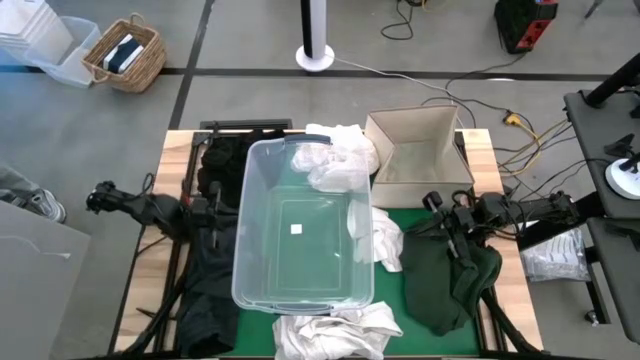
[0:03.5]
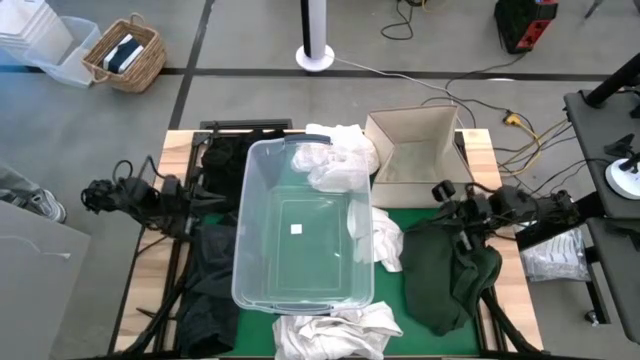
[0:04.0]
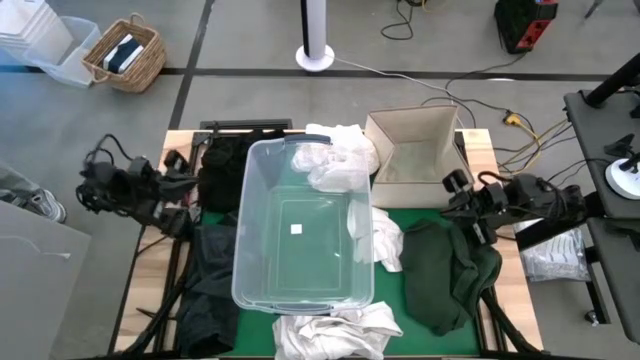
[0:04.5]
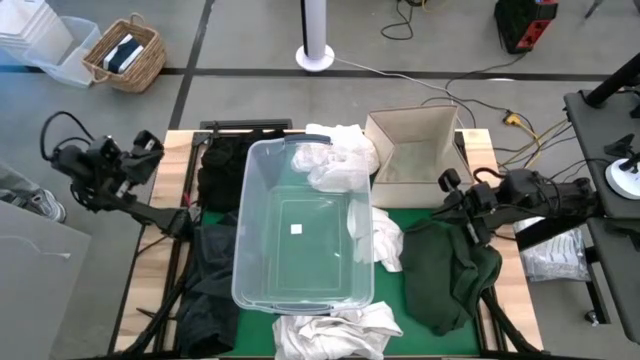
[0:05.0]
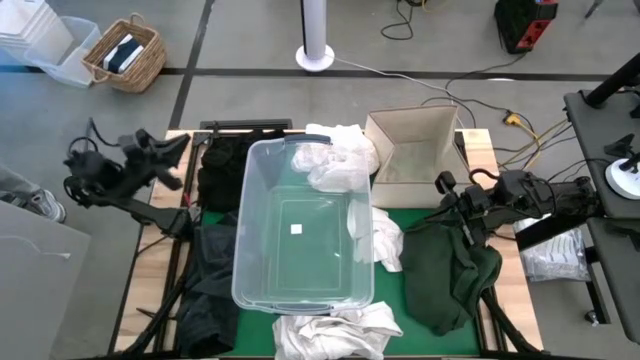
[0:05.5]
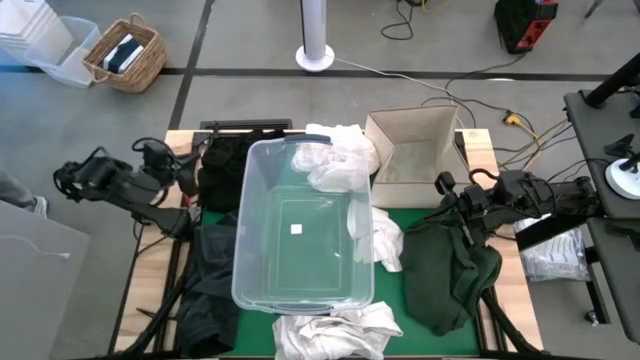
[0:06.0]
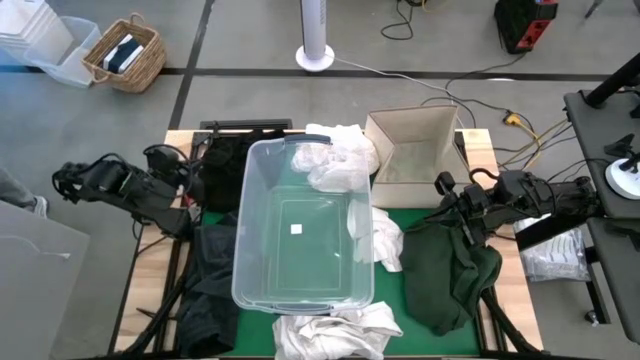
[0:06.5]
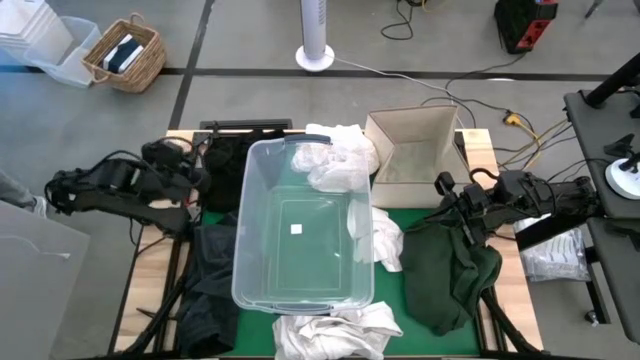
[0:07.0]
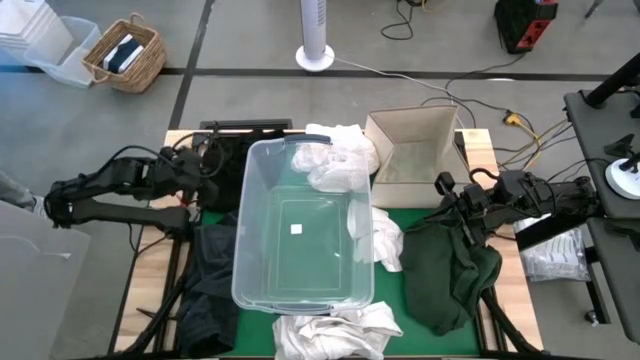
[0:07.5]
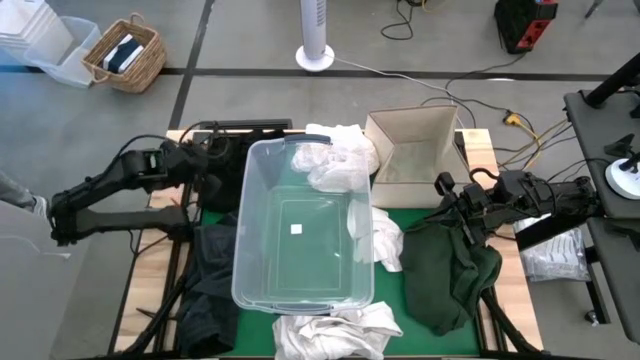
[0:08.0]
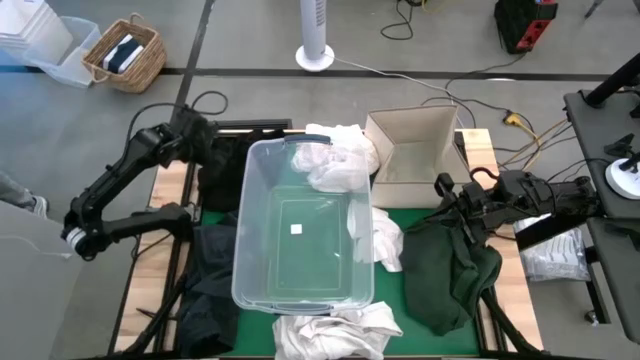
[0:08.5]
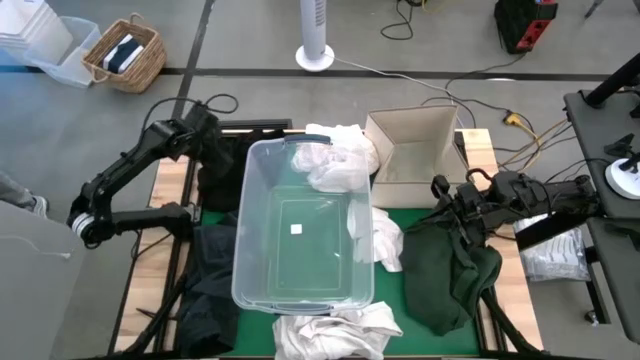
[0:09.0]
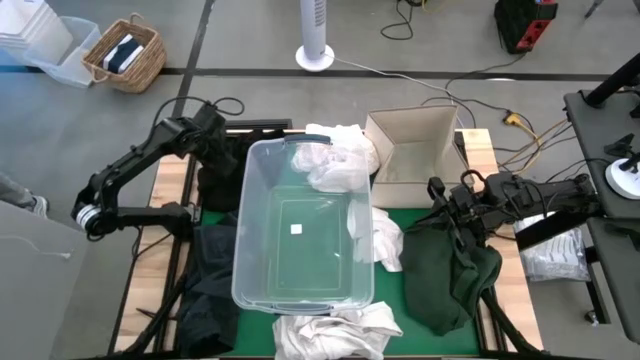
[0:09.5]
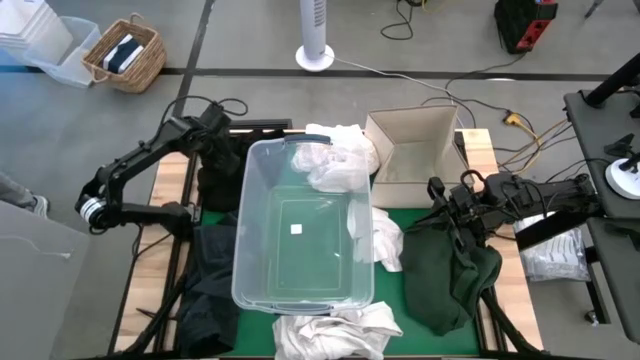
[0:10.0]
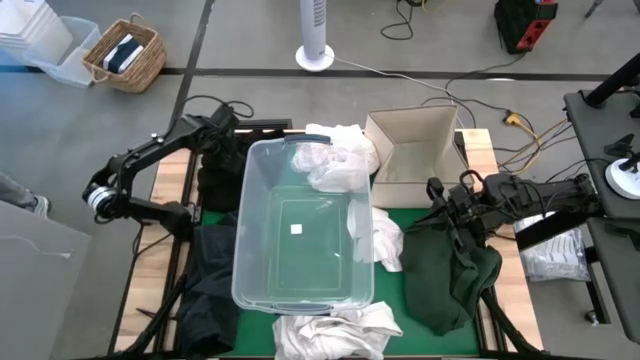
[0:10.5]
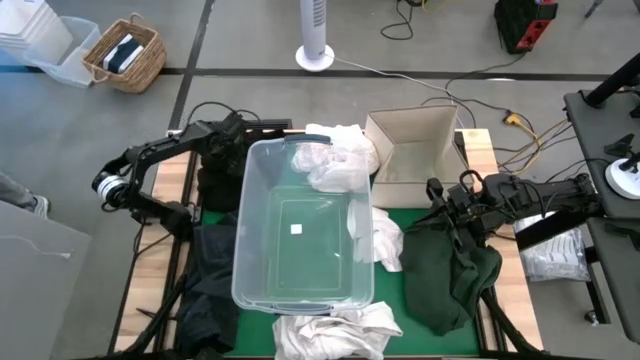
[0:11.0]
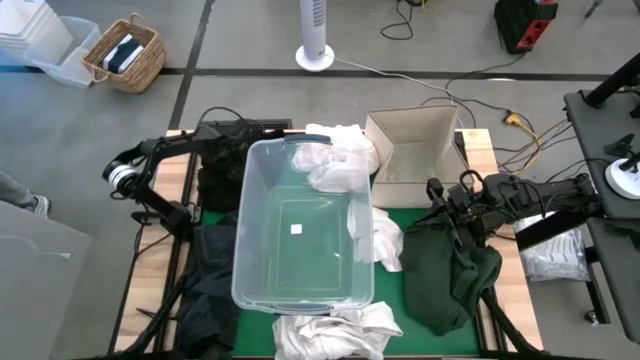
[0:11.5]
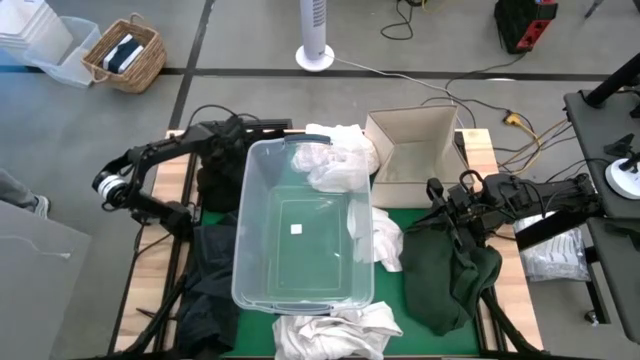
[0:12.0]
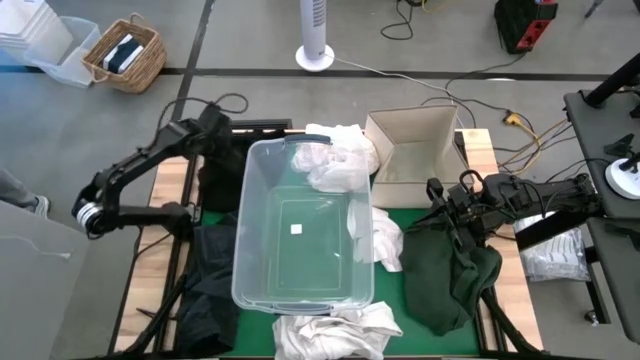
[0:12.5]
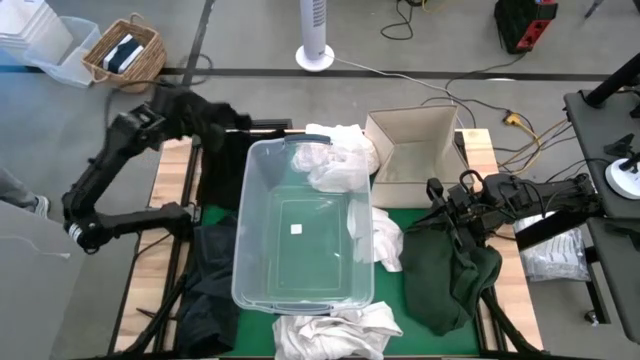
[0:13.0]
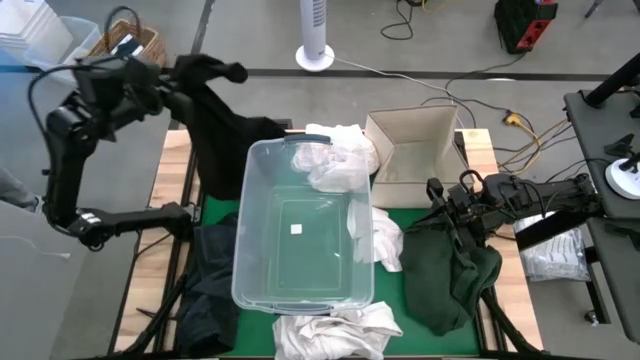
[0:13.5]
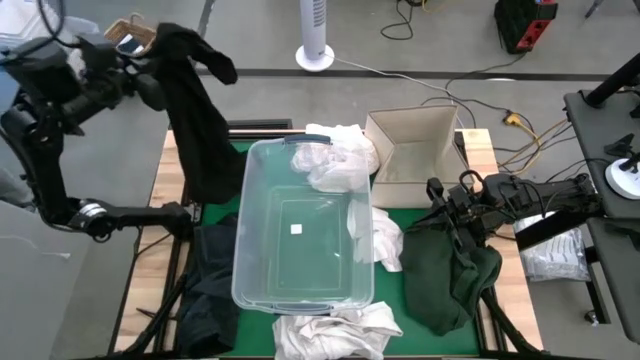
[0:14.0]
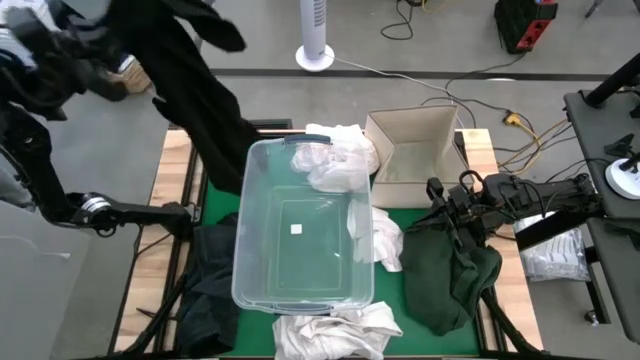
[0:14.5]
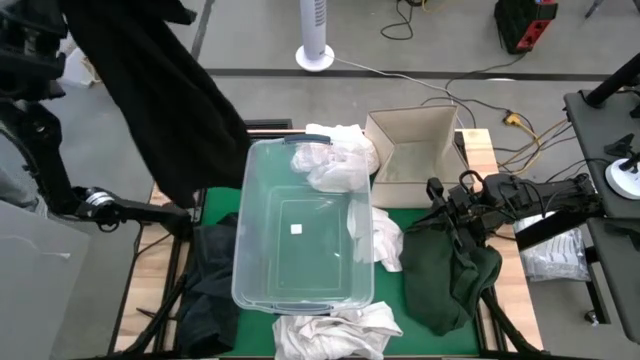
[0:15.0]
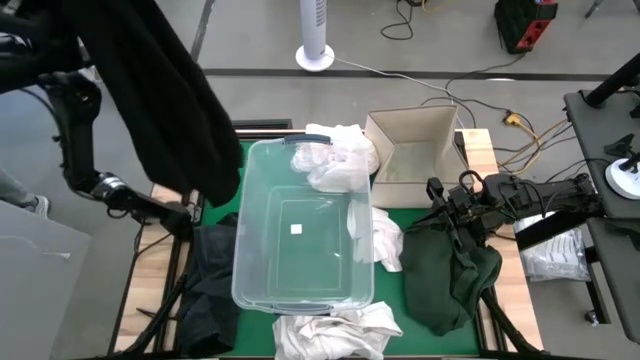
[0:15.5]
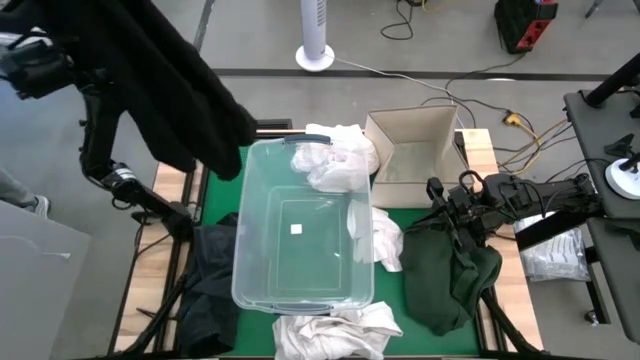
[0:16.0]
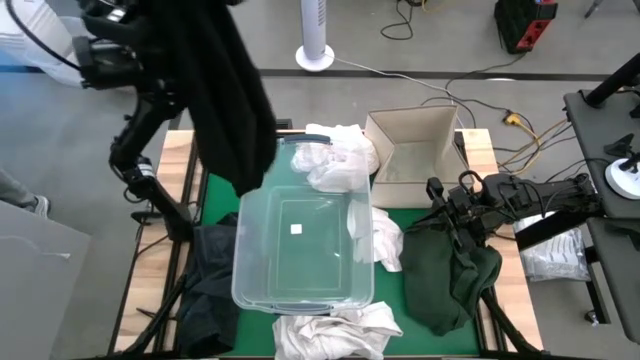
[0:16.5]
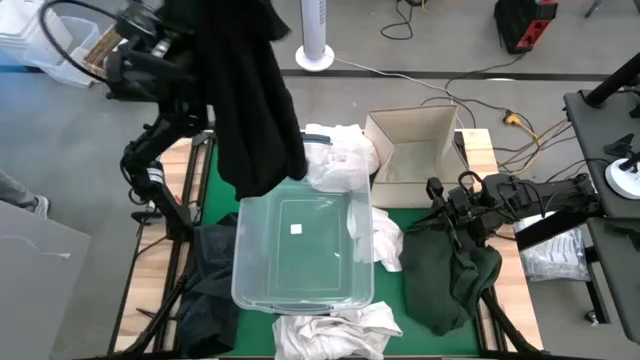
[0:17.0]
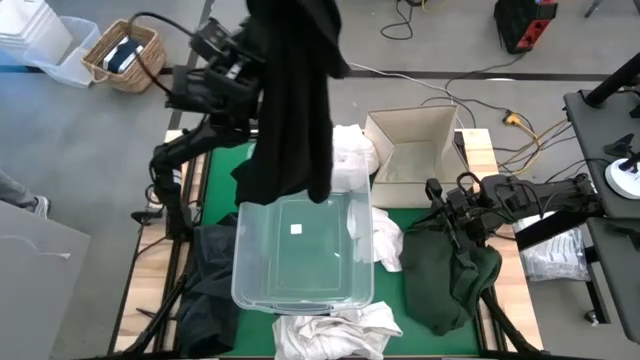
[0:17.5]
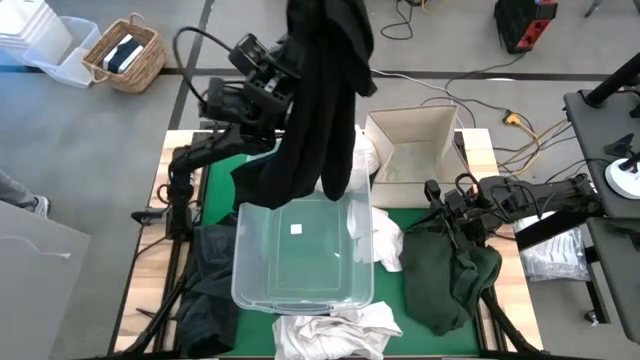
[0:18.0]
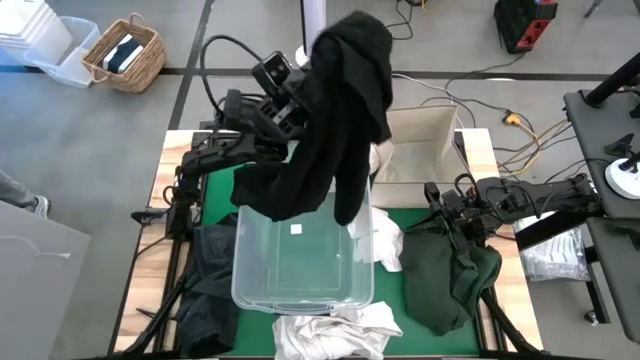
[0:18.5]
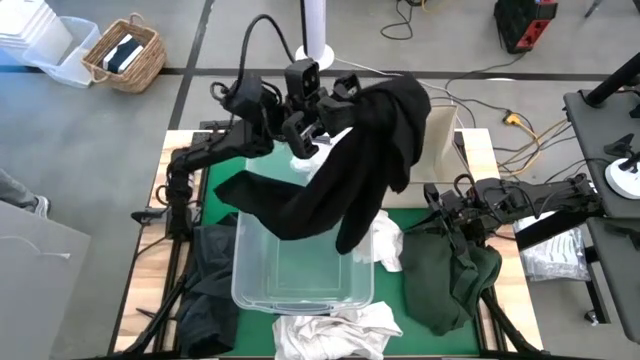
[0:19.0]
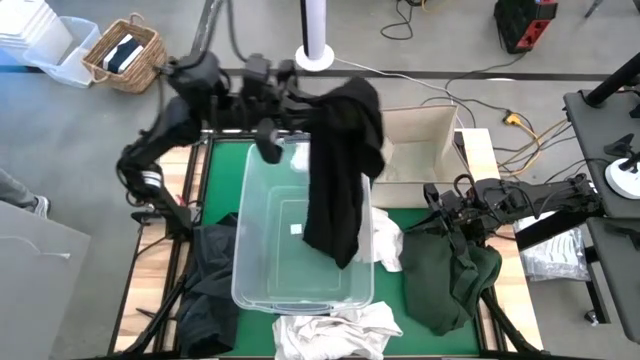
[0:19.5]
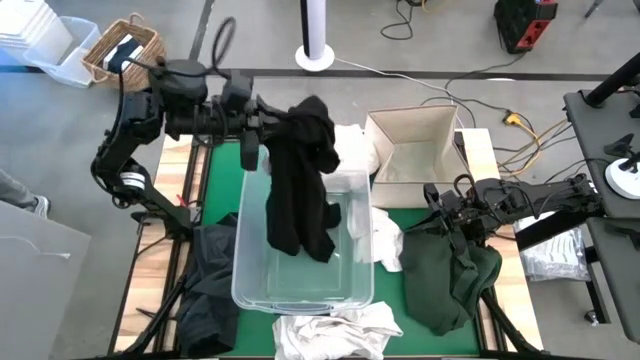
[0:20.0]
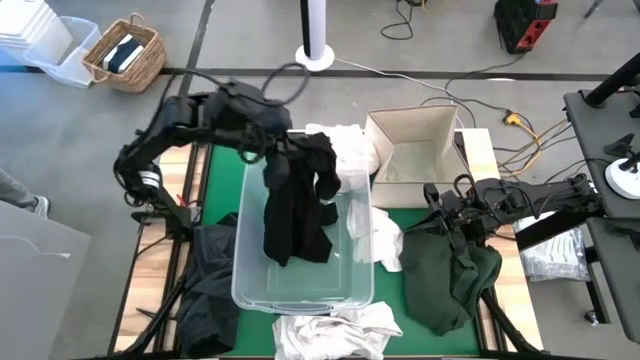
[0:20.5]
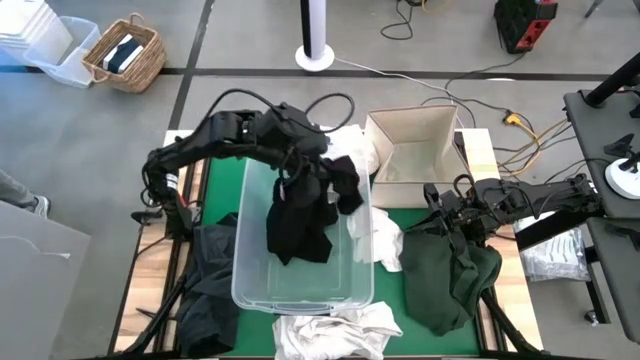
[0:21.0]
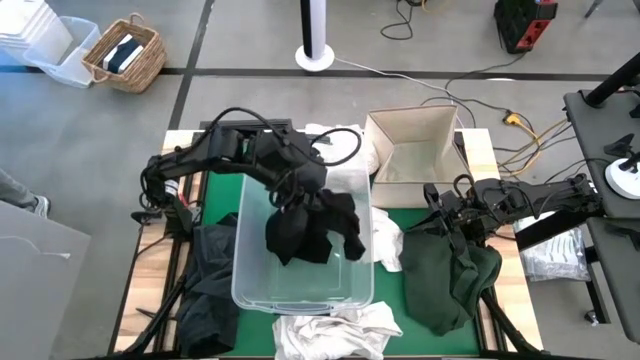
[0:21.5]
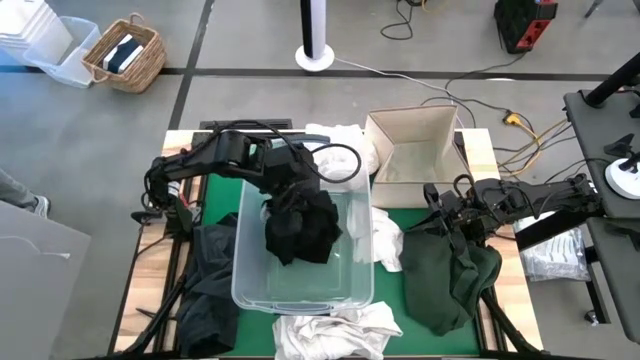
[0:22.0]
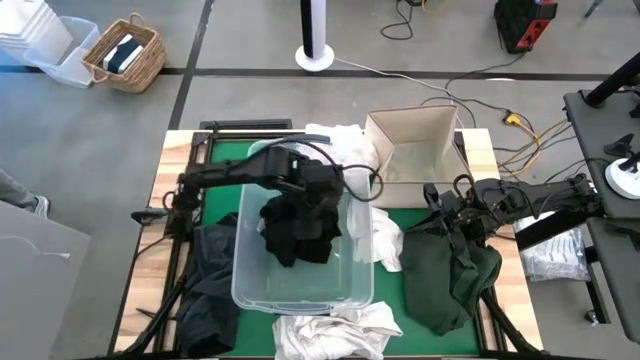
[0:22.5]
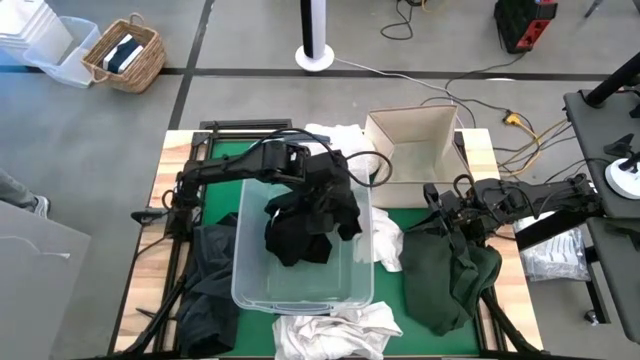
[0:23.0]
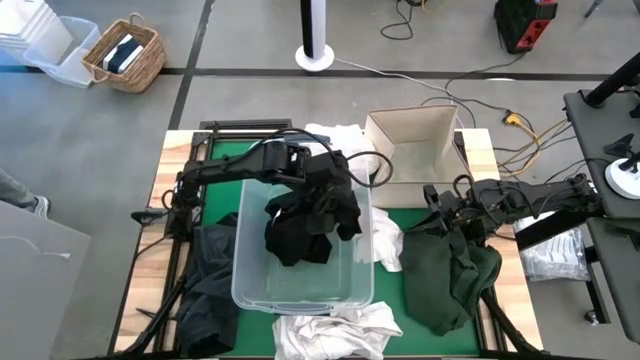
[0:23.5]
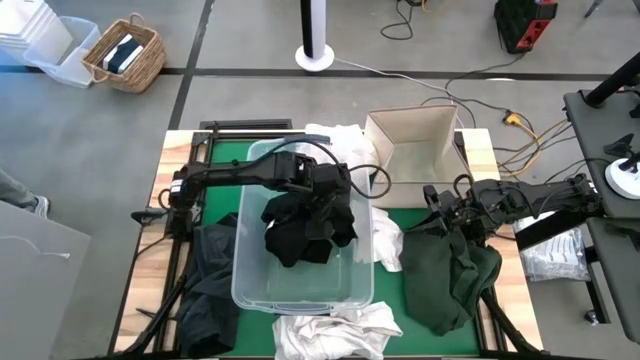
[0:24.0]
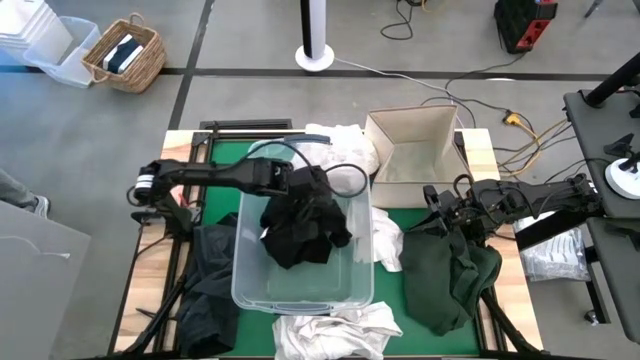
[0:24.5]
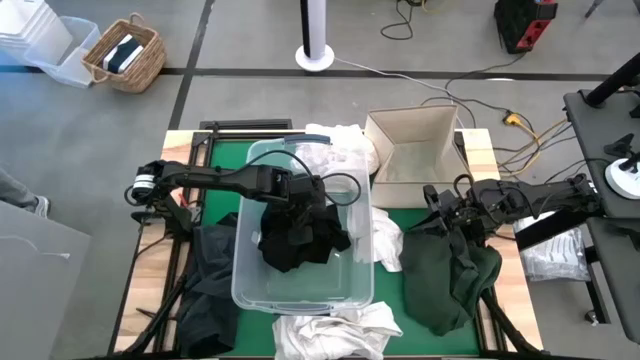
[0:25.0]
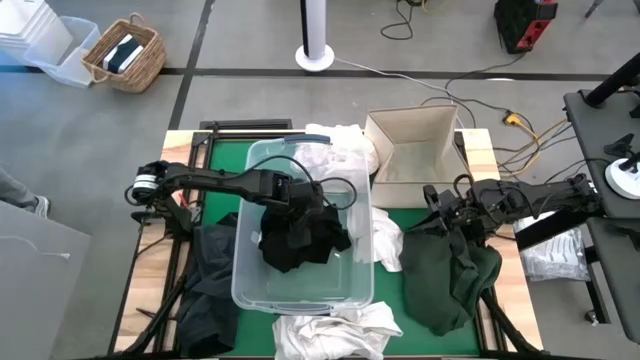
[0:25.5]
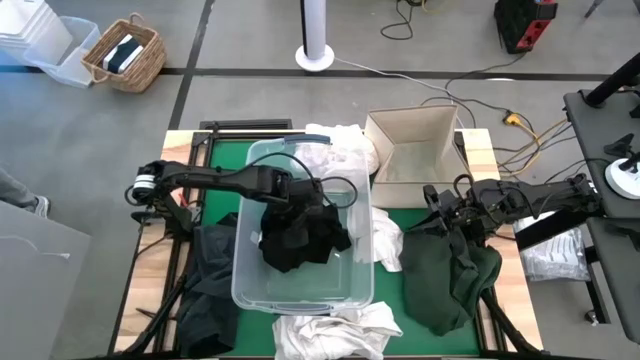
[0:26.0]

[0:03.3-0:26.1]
Put the black pants into the transparent bin
